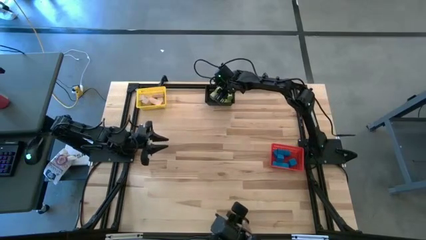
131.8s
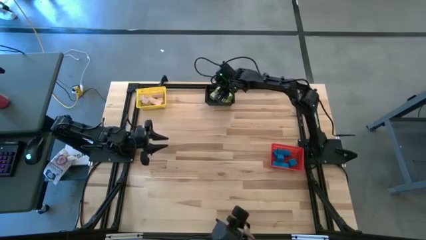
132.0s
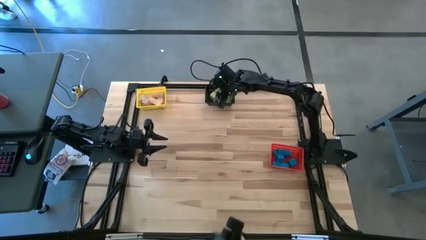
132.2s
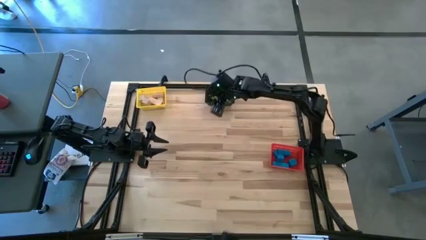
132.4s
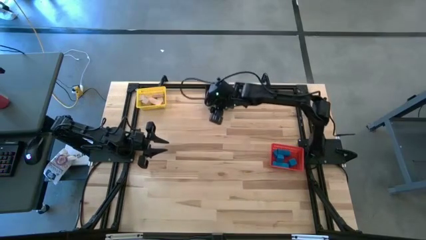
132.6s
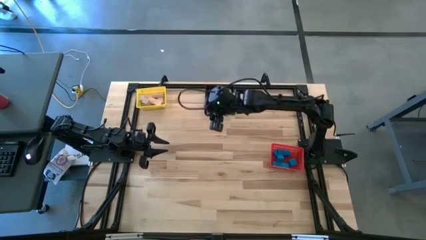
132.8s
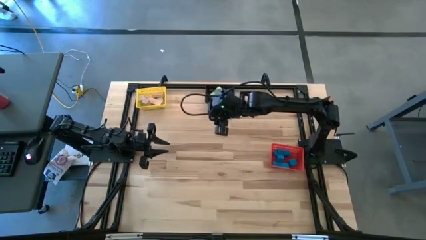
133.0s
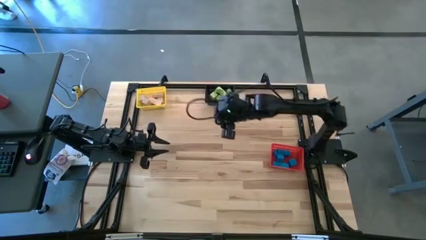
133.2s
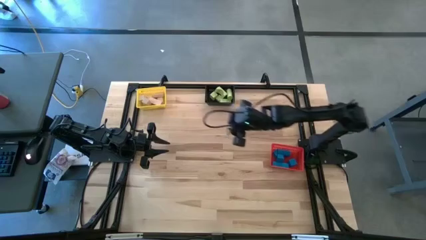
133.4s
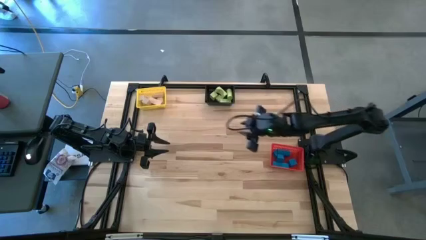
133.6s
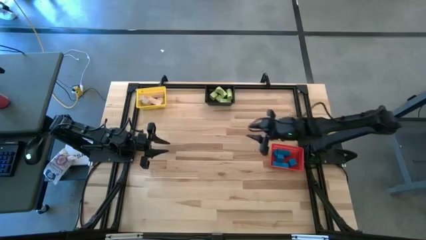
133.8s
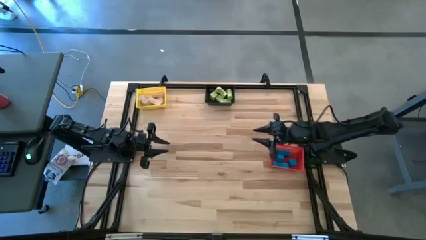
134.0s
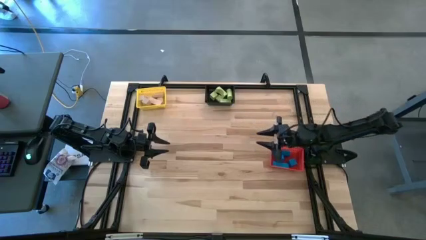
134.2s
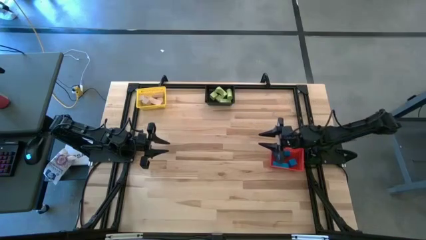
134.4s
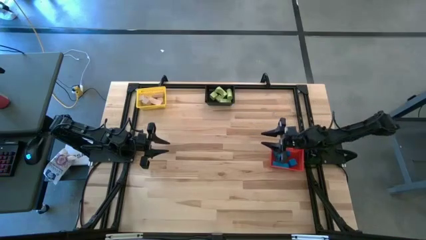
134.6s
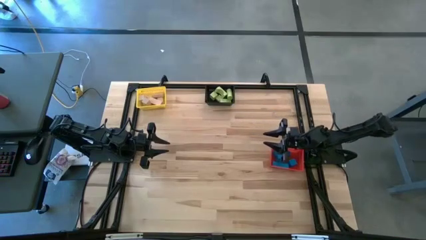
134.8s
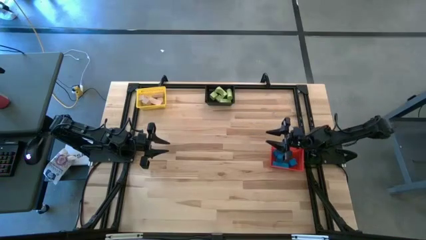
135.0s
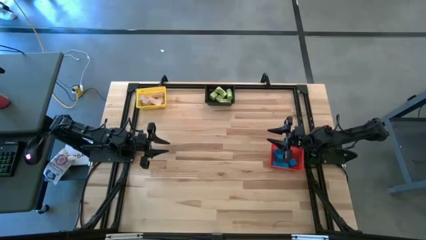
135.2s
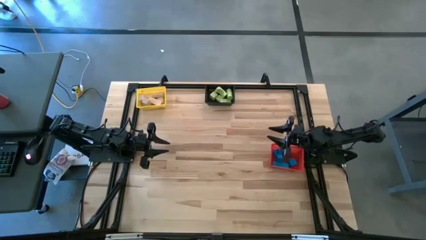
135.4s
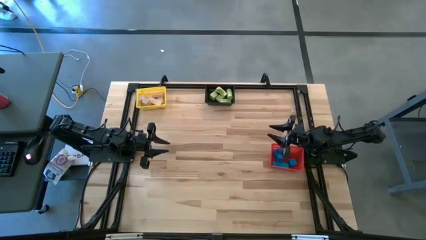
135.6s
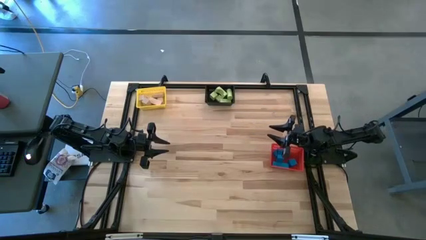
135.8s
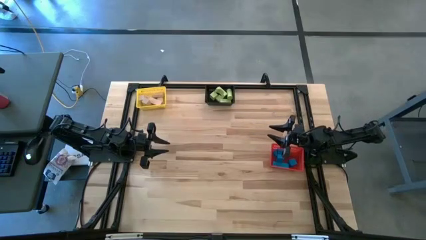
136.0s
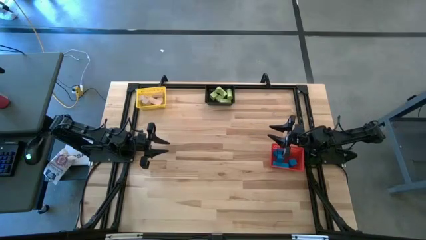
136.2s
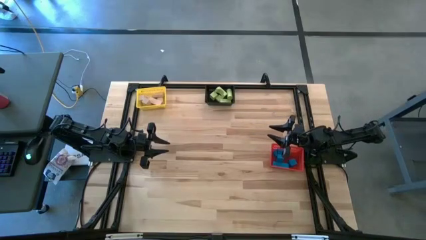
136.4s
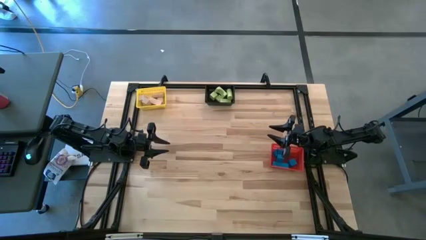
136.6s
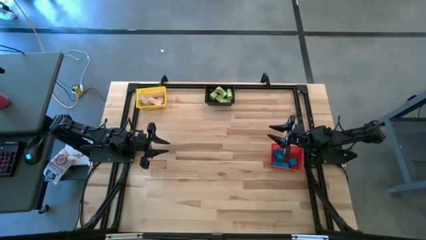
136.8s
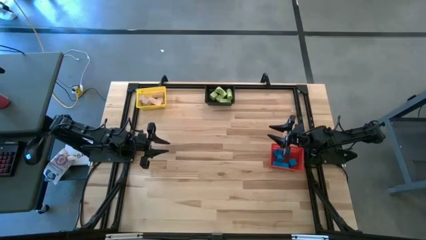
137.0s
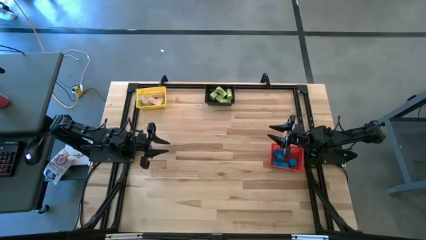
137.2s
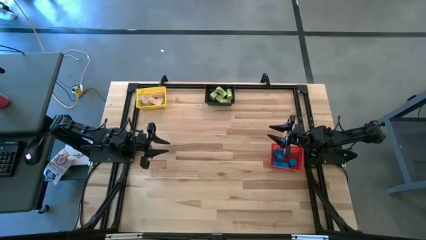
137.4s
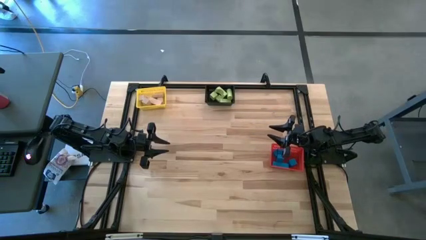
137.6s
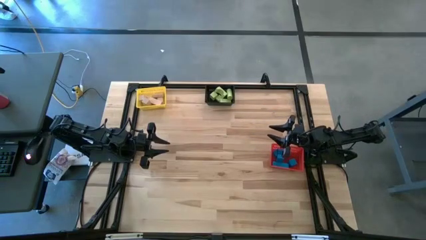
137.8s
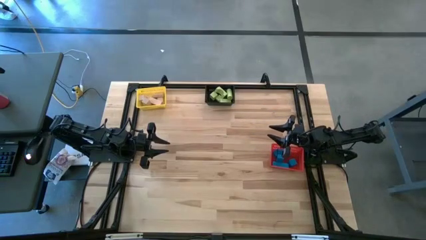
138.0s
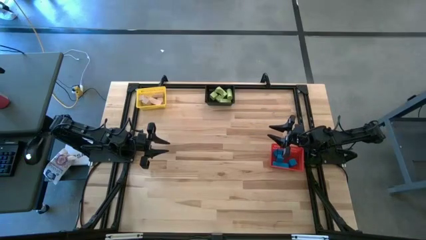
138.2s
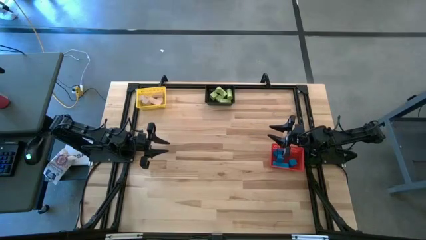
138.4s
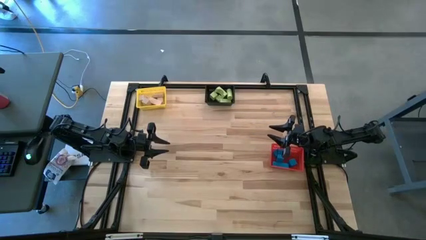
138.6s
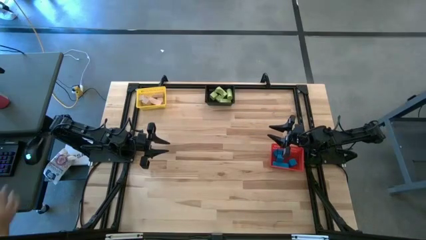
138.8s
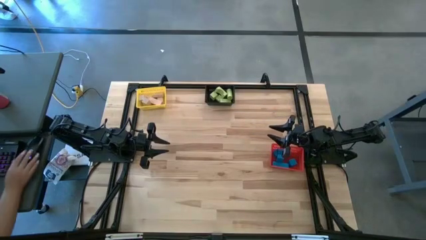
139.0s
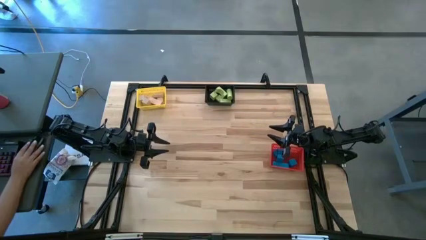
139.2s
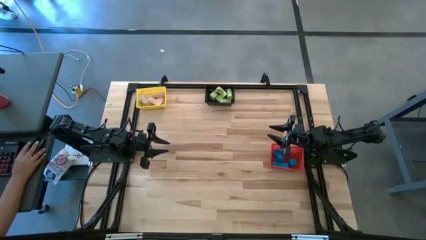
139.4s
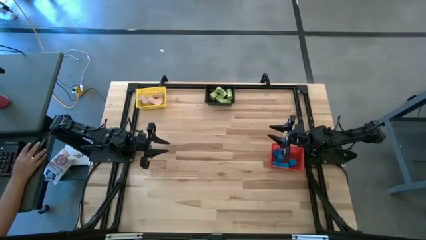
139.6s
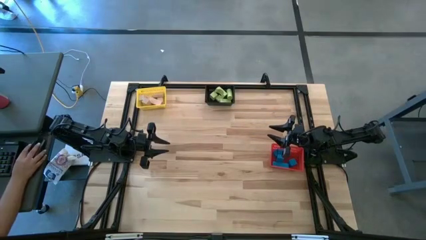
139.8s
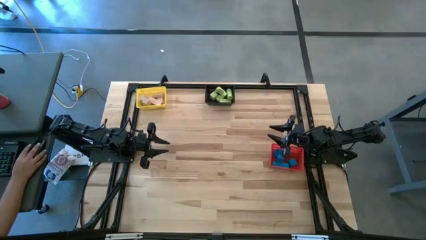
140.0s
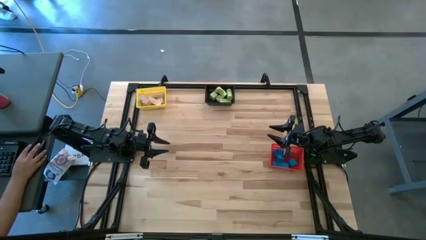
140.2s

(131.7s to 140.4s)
Task: Sort & place blocks by color
Return to Home Position

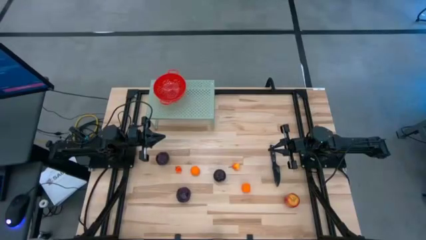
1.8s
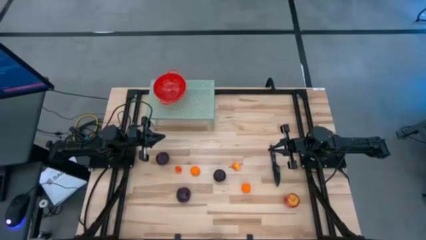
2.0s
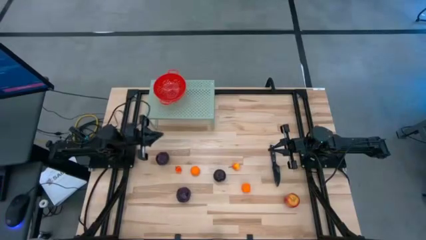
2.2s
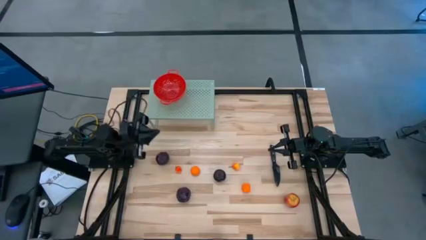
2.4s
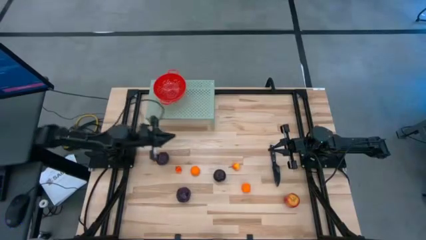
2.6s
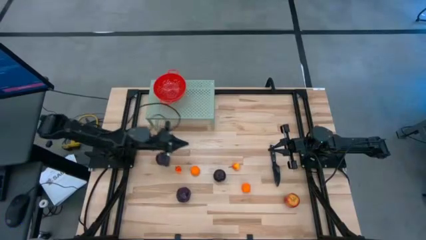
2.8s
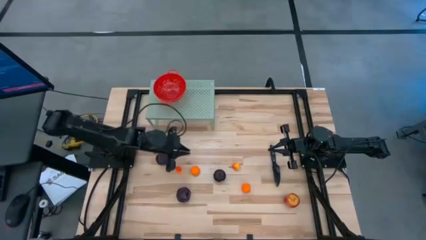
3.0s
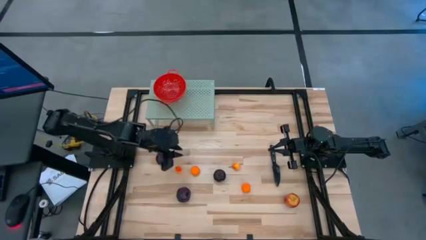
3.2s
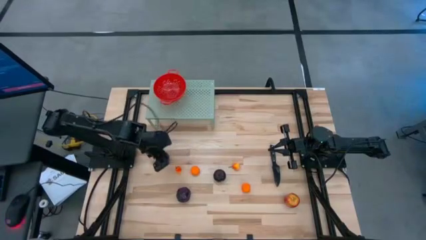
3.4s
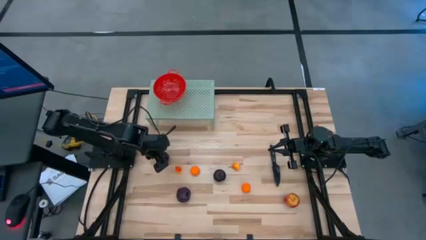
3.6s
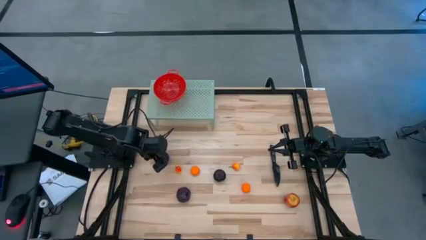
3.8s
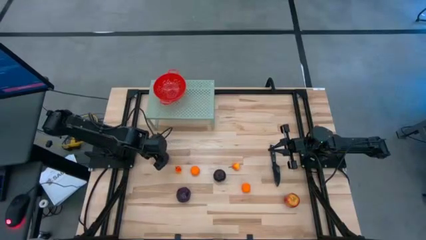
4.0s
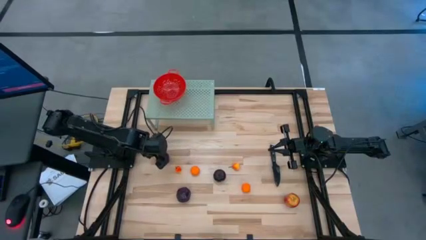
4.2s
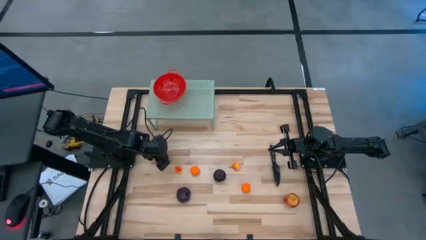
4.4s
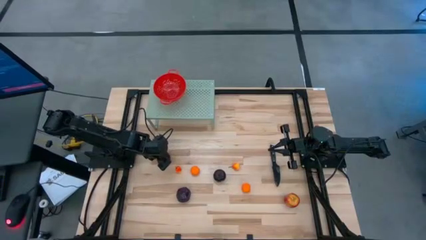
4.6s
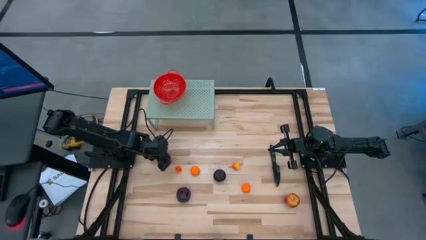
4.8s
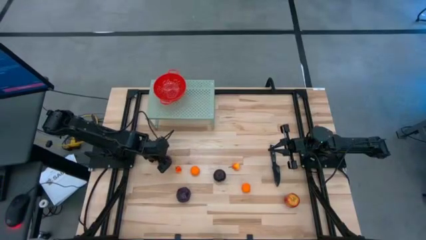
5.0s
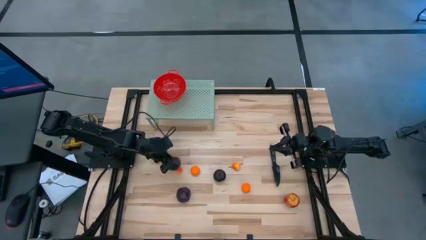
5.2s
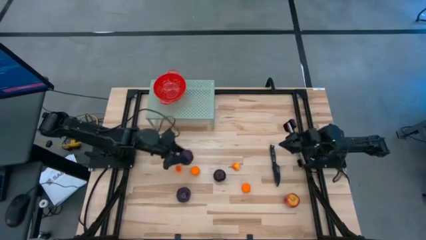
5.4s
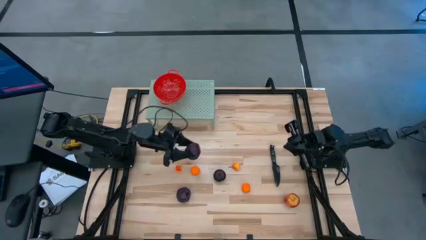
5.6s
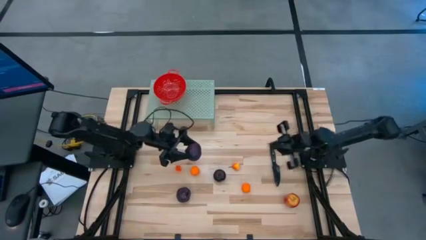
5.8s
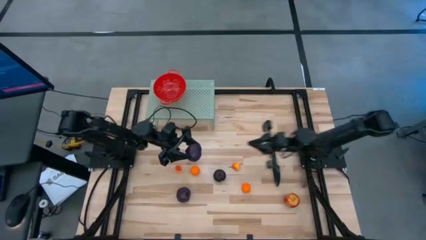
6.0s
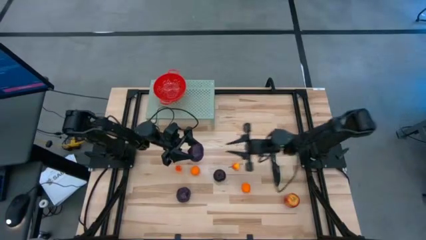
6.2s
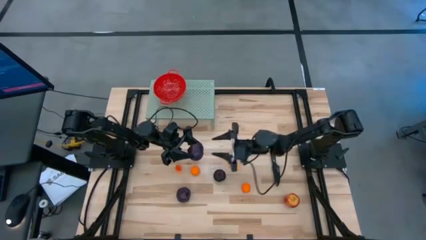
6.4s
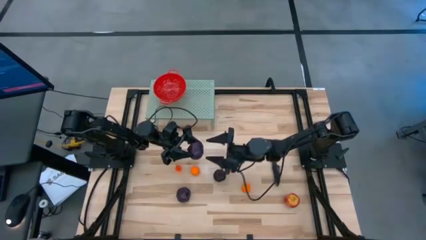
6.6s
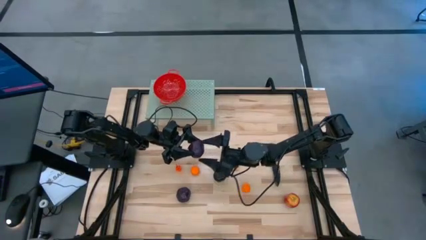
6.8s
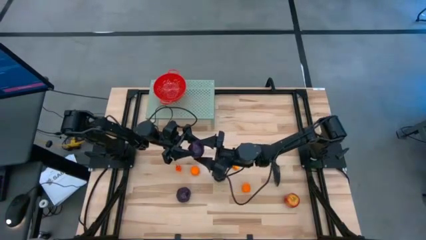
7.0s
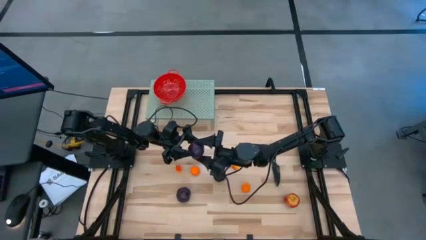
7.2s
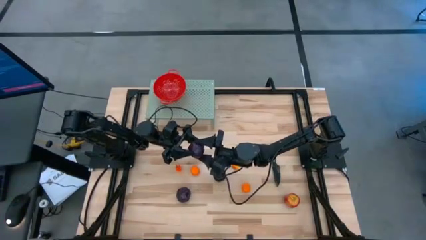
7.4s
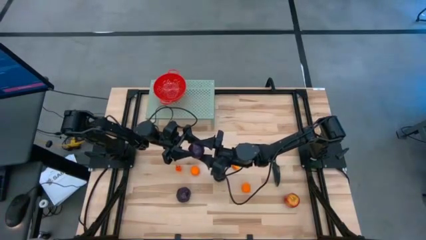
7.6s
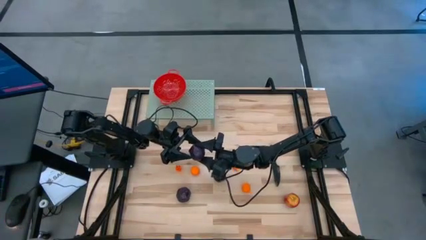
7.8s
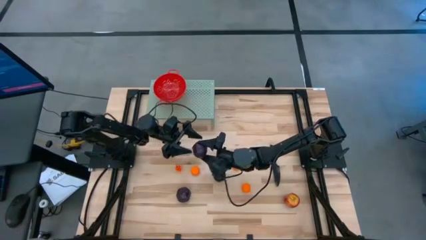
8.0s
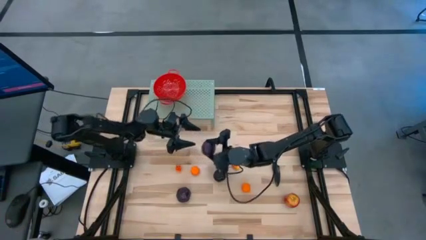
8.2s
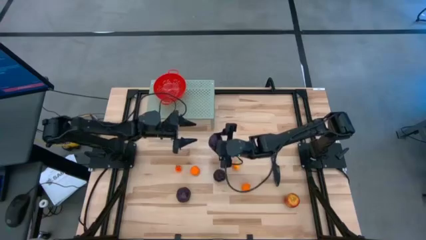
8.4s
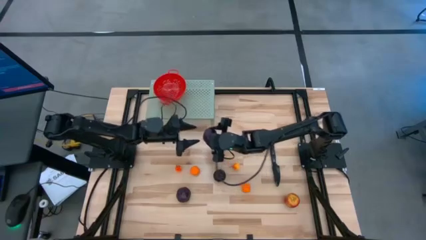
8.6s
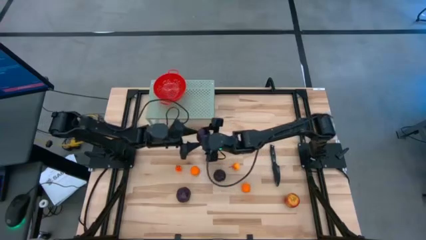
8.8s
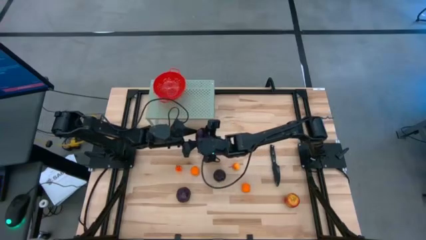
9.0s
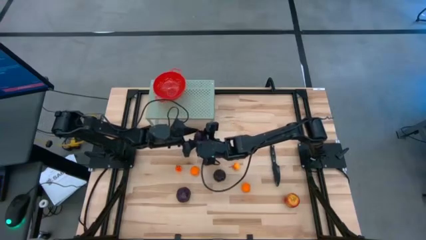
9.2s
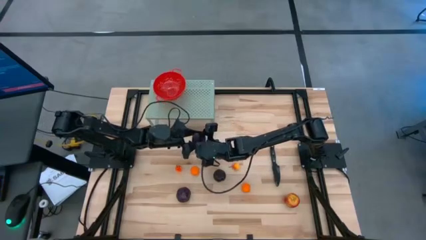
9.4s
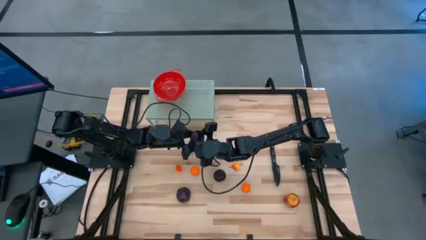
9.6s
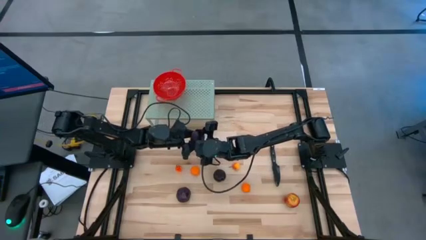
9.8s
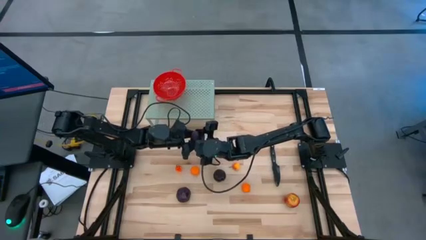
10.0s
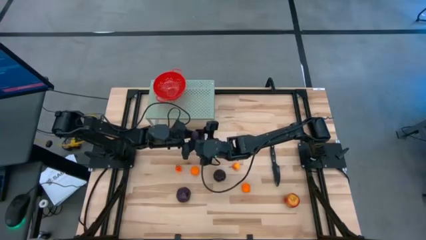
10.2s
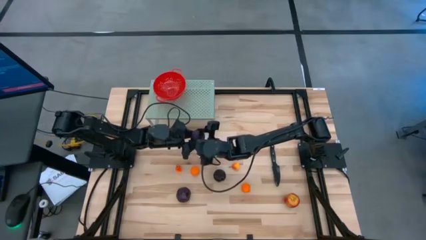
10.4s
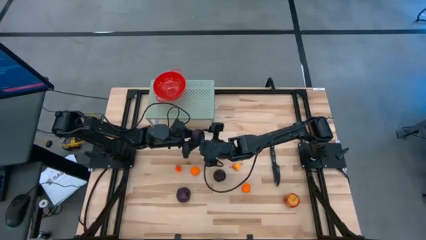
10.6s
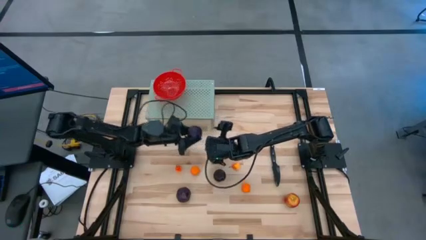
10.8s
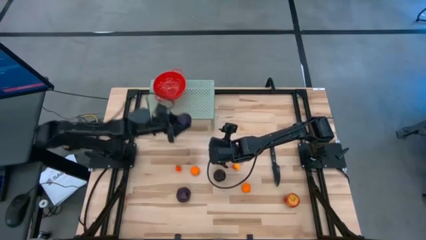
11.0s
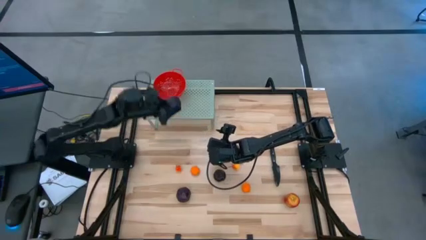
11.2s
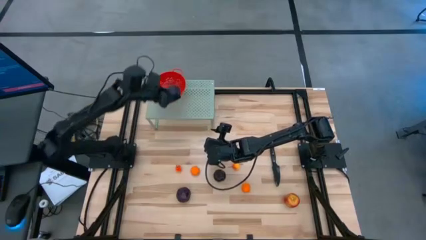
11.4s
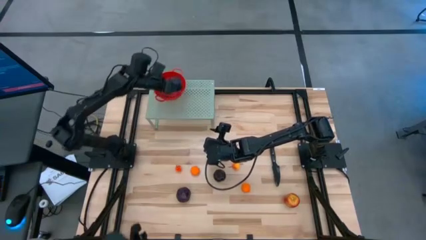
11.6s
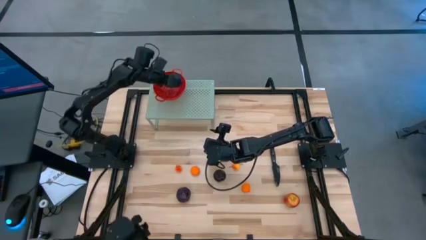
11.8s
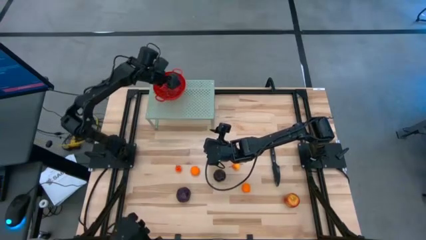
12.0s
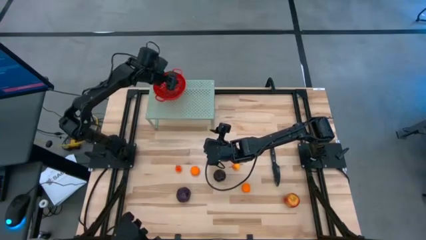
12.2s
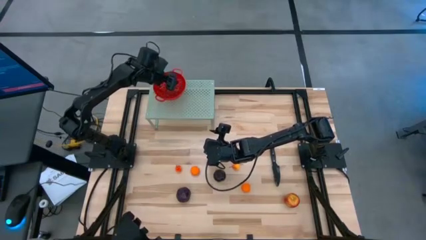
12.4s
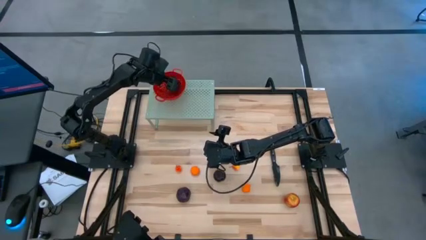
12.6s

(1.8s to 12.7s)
Task: Pick & Place Fruit
Put the top left purple plum into the red strainer bowl
